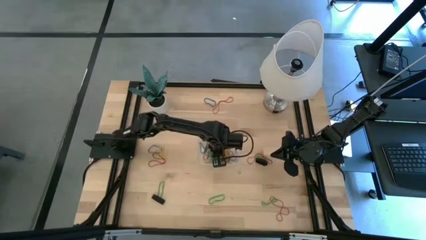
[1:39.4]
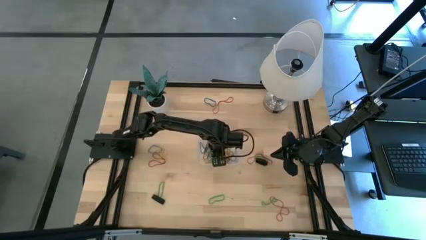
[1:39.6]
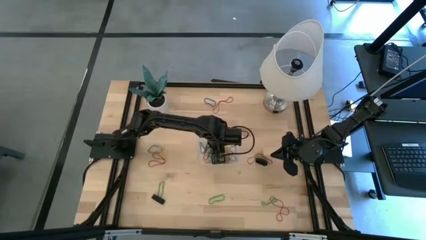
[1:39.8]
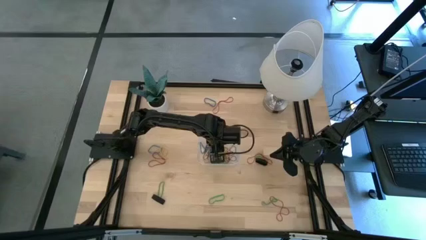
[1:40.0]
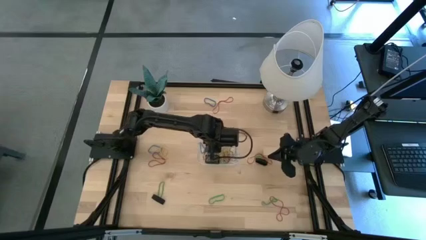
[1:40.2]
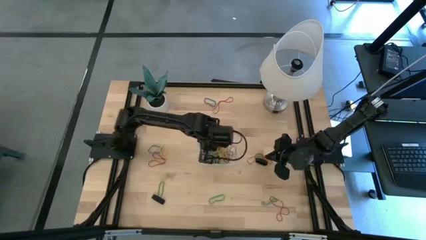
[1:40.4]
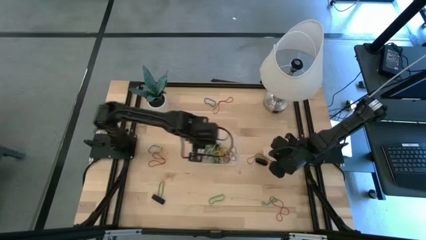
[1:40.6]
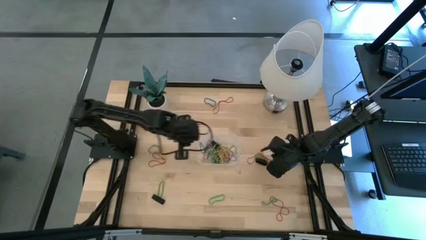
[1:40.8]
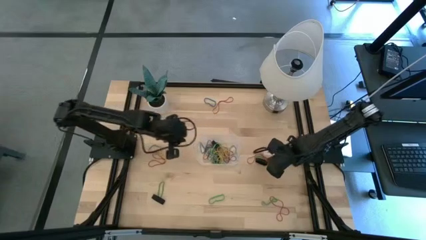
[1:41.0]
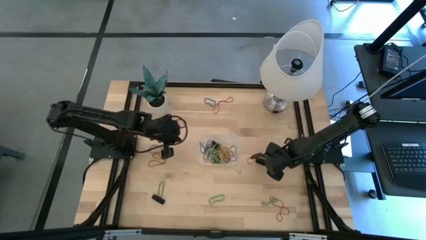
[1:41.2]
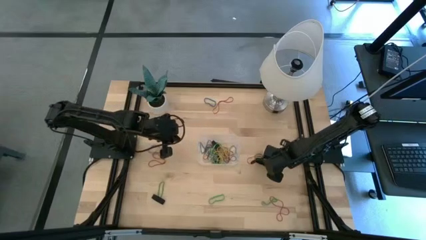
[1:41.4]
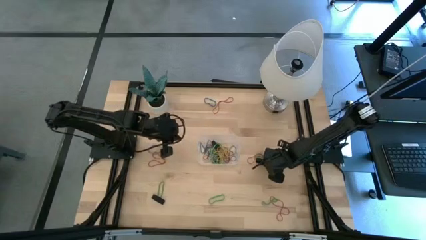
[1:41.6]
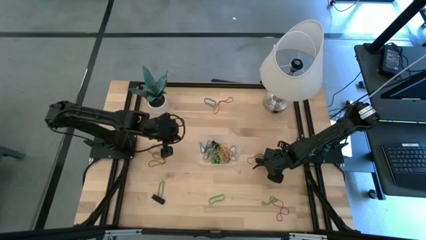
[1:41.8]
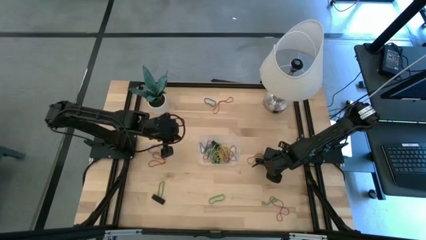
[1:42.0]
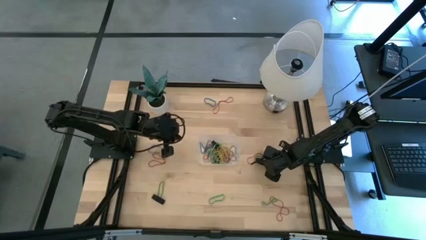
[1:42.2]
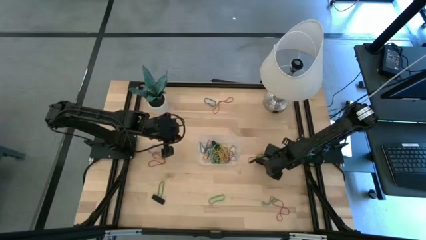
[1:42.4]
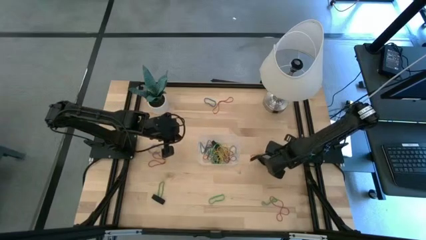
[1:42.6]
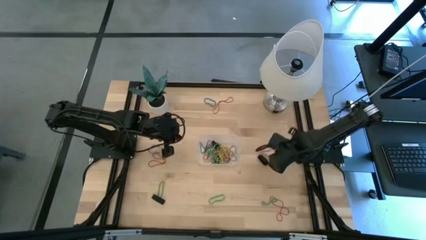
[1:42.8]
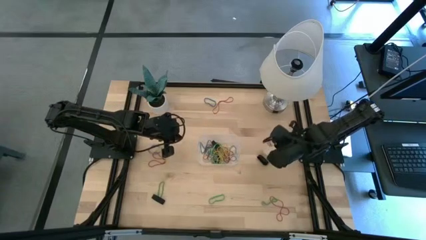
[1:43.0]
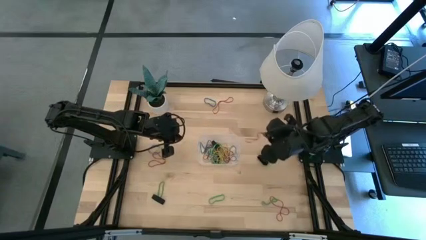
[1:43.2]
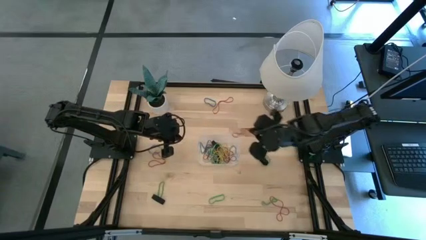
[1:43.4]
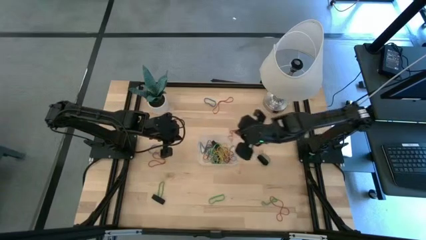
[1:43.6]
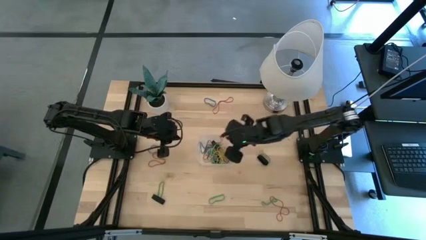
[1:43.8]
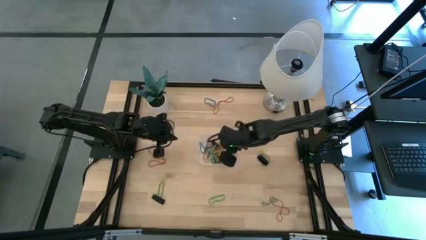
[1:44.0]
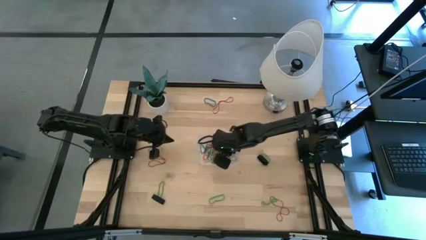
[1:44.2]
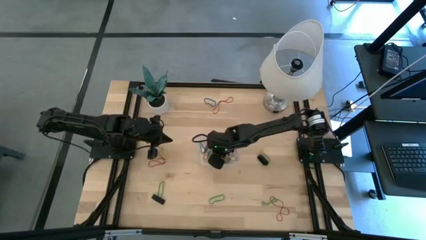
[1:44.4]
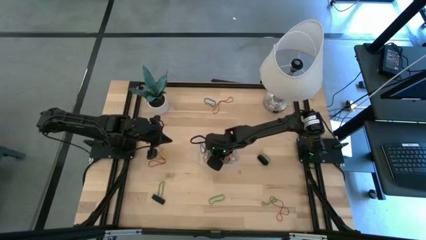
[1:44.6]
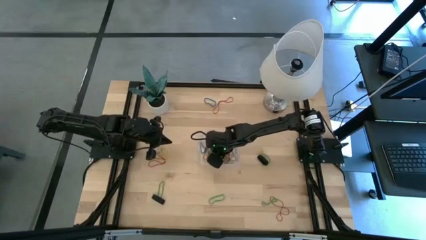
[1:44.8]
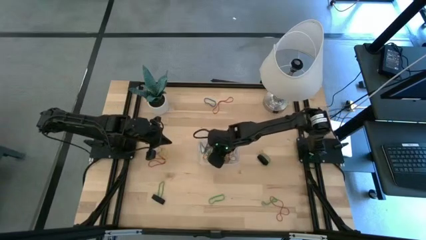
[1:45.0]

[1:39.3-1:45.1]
Task: Pick and place rubber bands into bin
Put the red rubber band into the transparent bin

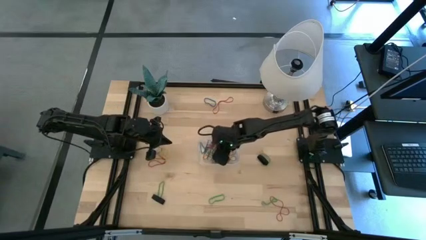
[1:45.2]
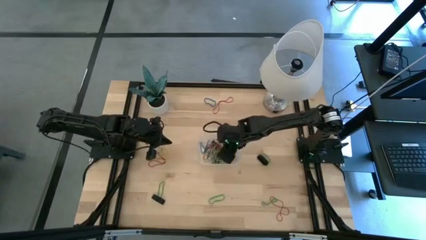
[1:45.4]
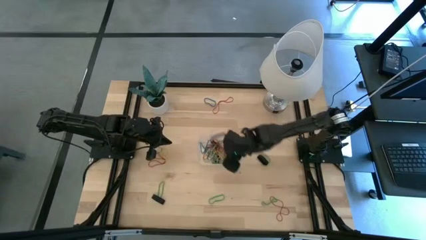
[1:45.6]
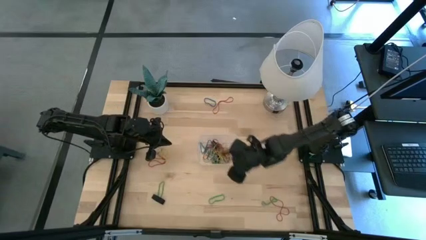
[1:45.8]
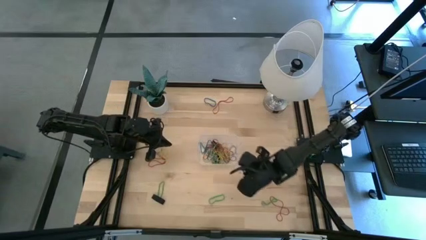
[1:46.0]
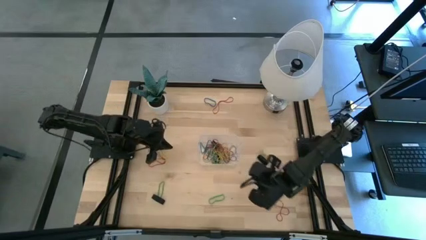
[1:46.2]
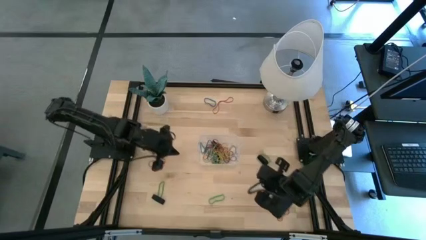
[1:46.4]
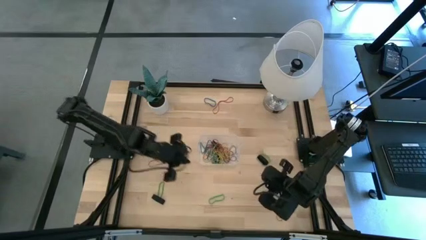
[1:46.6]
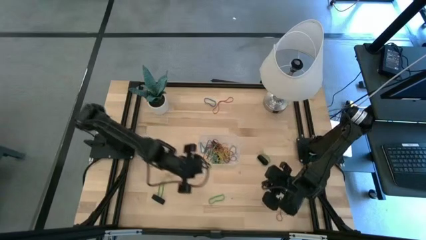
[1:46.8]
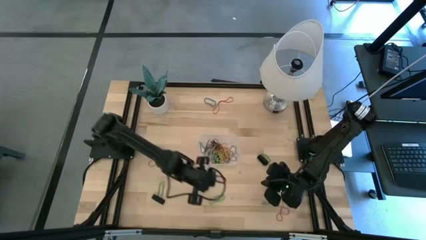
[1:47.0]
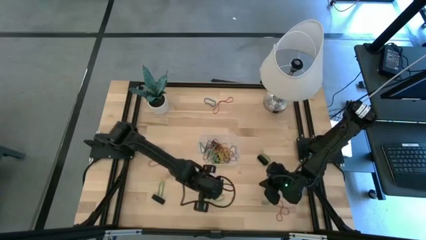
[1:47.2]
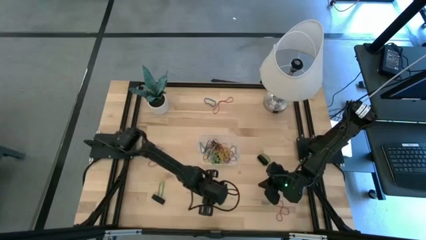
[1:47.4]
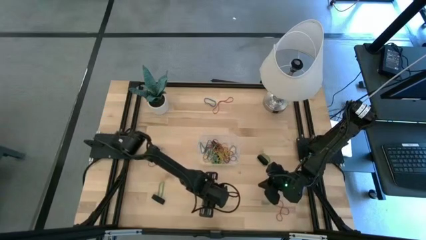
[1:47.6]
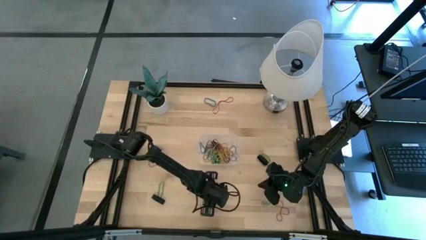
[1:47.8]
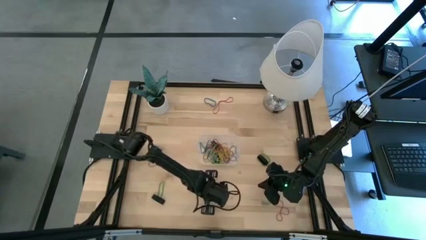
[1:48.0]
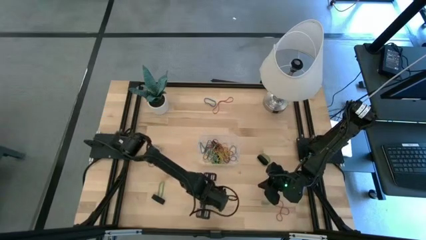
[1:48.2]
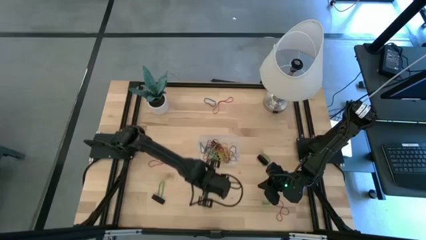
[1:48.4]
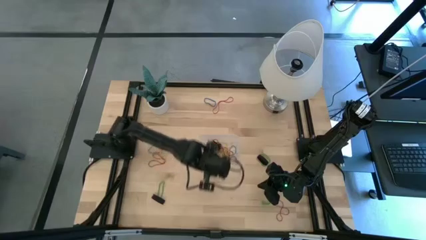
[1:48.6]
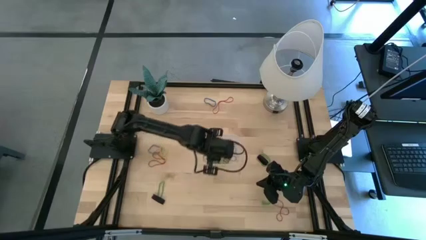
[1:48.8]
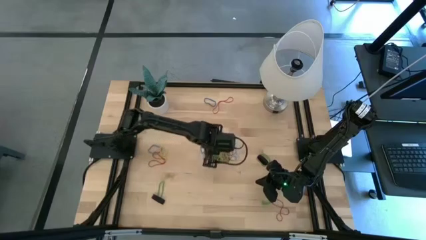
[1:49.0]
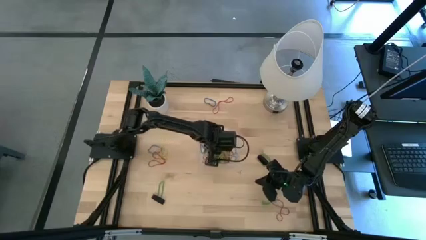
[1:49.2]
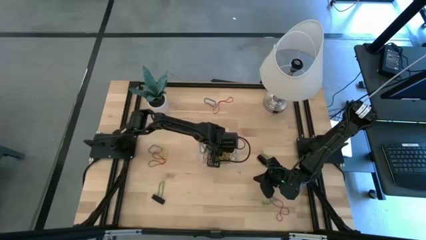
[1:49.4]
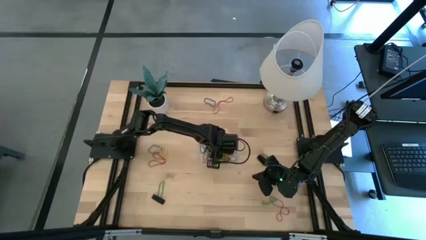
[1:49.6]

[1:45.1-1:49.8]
Put the green rubber band into the transparent bin

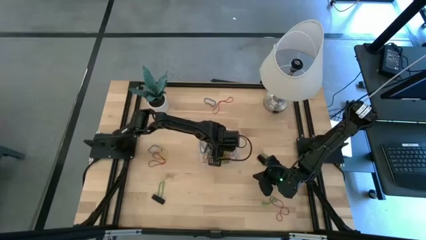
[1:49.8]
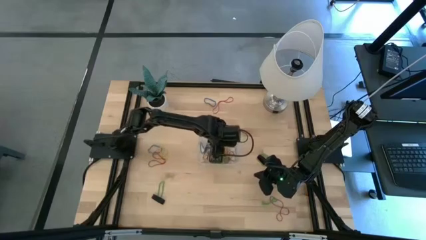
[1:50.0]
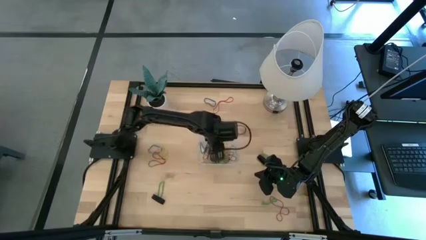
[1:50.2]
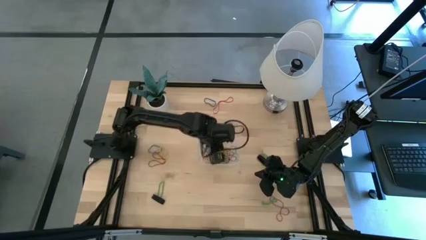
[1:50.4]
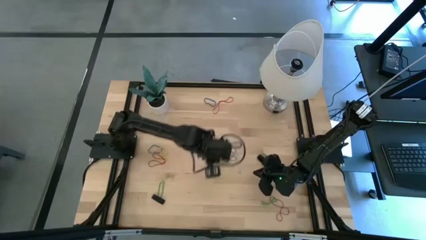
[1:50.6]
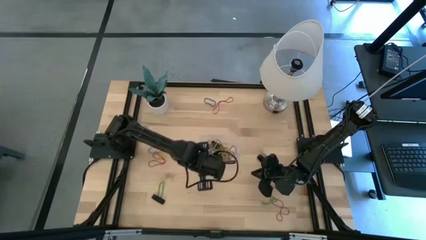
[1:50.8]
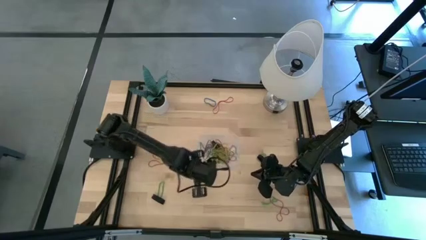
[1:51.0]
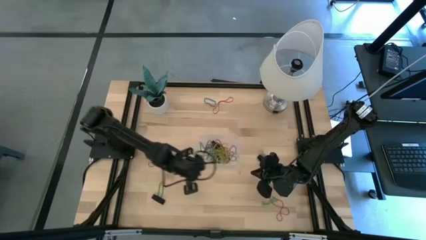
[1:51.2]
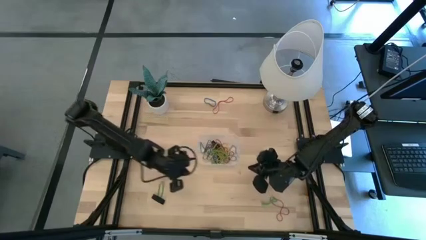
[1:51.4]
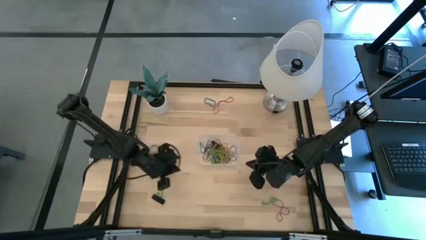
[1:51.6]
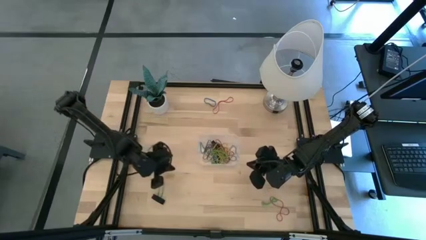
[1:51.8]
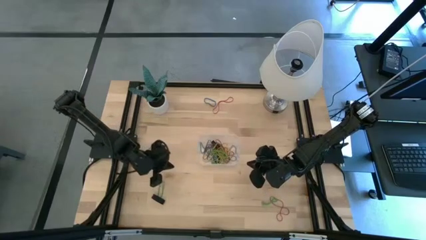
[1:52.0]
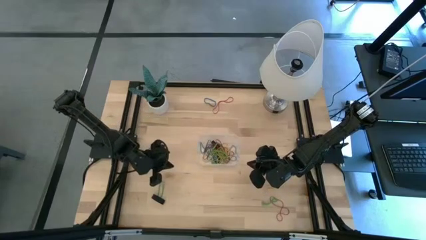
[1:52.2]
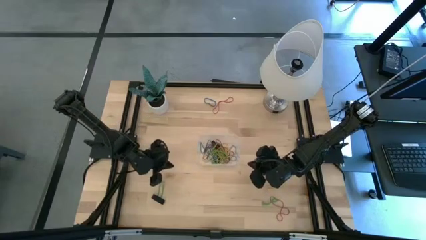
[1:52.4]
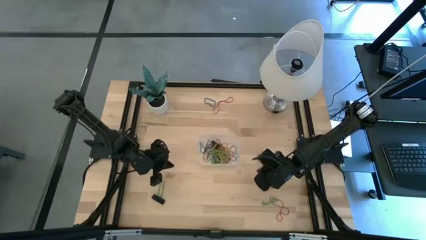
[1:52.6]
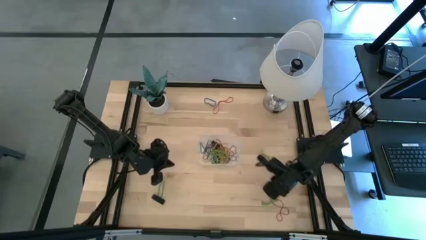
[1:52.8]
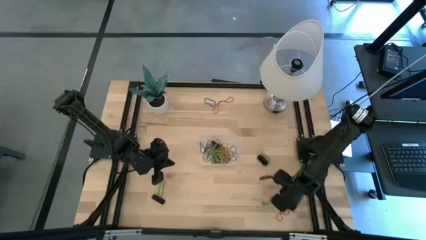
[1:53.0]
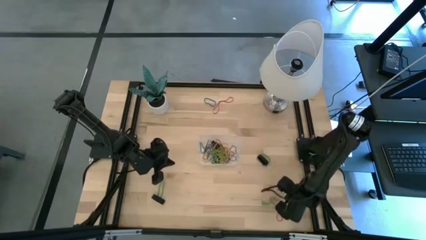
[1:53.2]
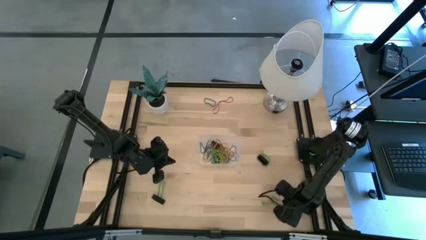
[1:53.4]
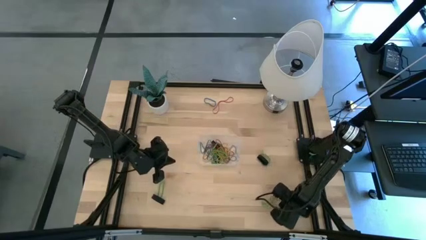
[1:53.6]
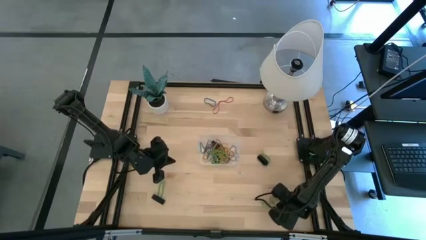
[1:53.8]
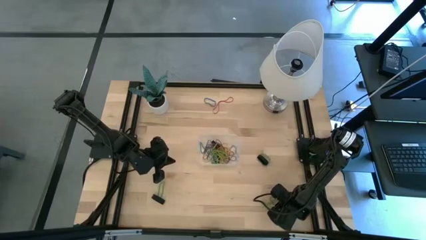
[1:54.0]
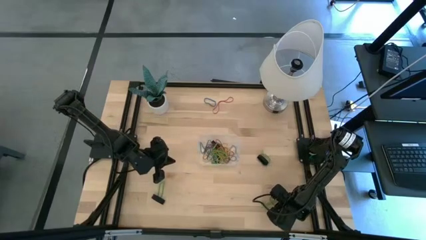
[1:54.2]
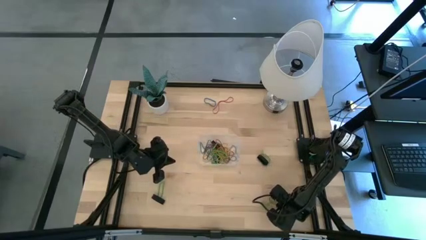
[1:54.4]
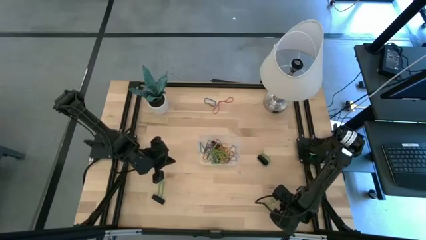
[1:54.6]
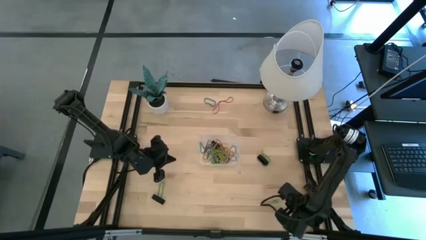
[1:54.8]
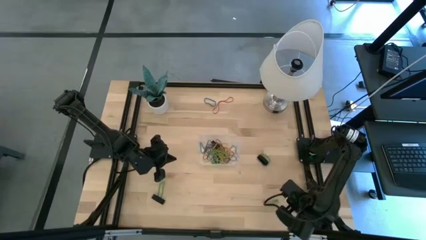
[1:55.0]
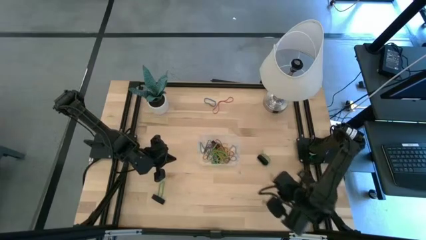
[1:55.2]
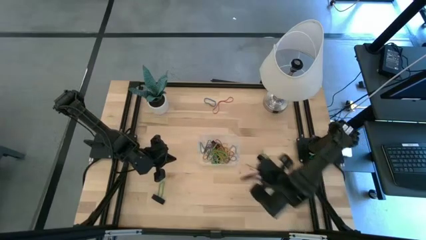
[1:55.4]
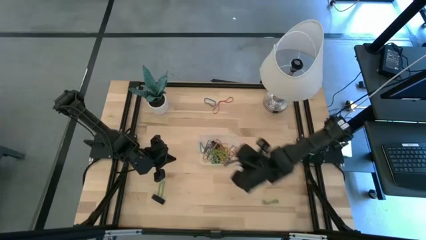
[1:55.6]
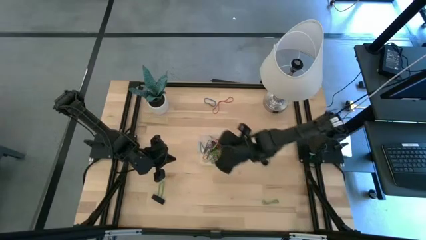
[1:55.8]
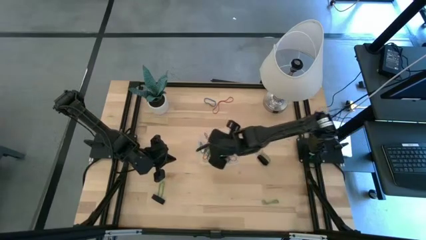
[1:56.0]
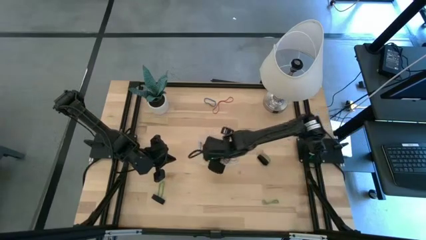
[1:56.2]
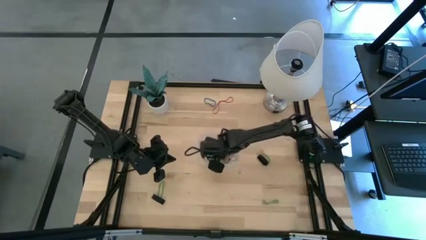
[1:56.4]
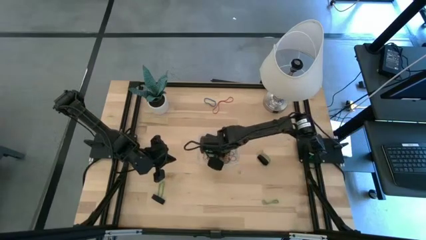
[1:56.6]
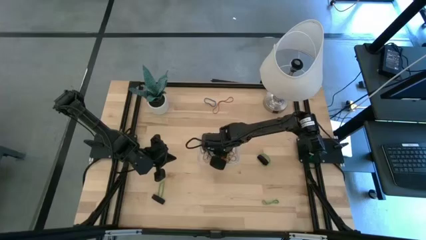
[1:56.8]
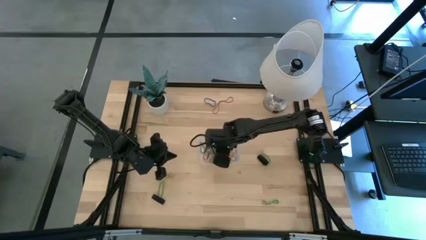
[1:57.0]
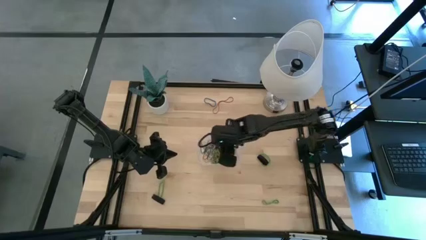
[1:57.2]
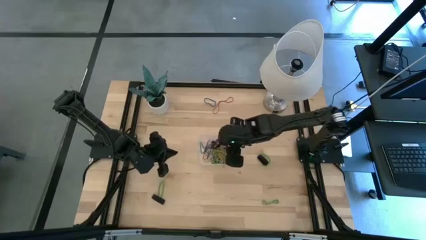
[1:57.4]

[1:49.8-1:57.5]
Put the red rubber band into the transparent bin
